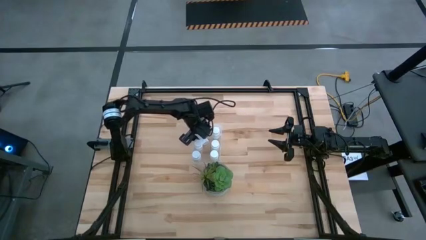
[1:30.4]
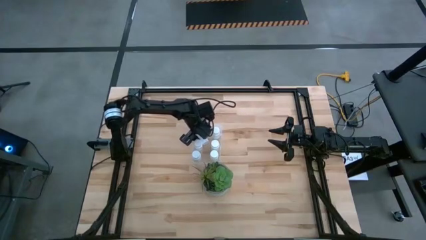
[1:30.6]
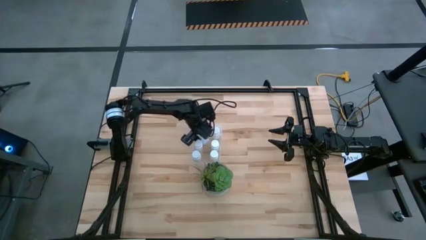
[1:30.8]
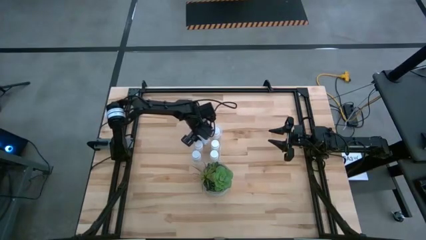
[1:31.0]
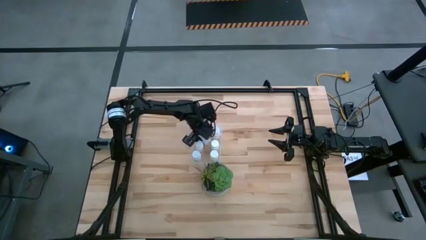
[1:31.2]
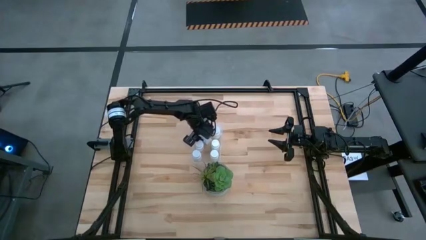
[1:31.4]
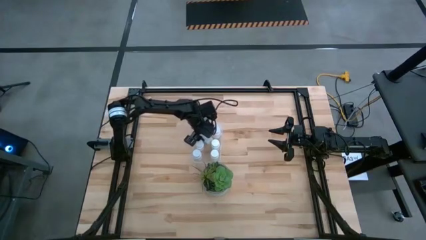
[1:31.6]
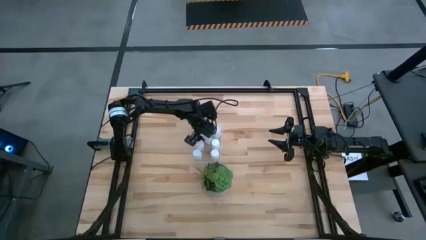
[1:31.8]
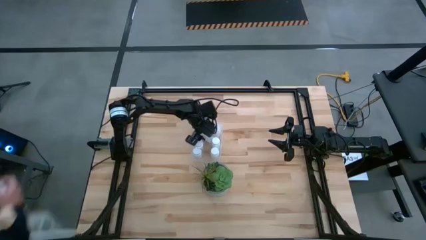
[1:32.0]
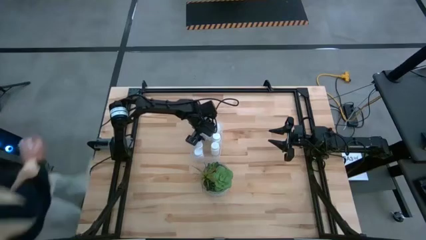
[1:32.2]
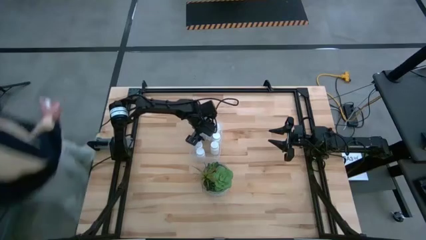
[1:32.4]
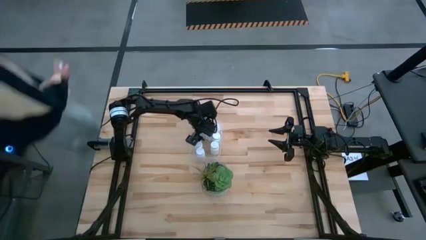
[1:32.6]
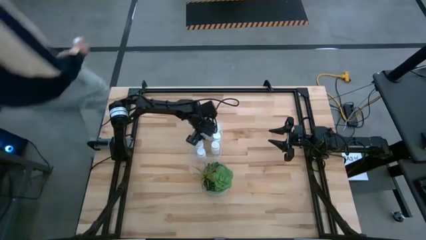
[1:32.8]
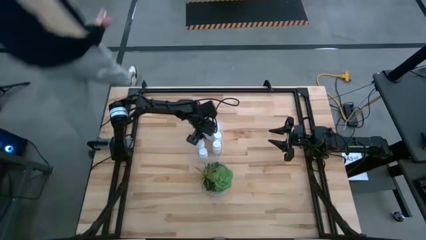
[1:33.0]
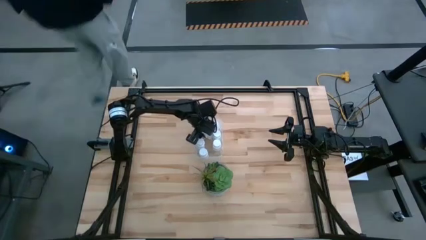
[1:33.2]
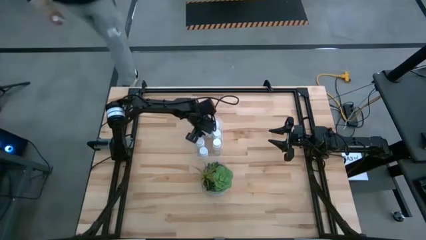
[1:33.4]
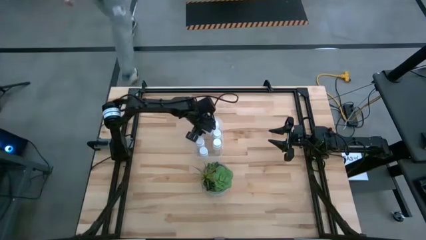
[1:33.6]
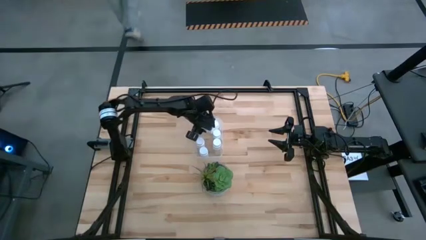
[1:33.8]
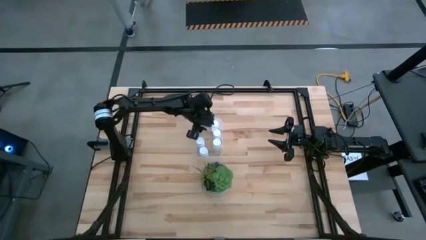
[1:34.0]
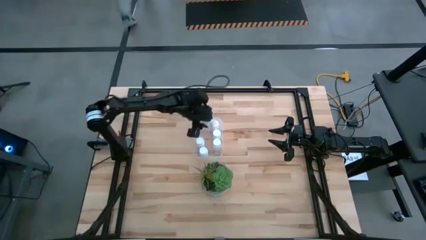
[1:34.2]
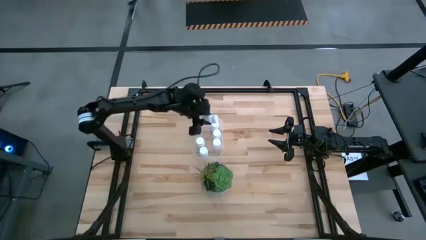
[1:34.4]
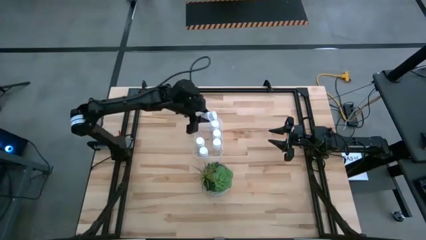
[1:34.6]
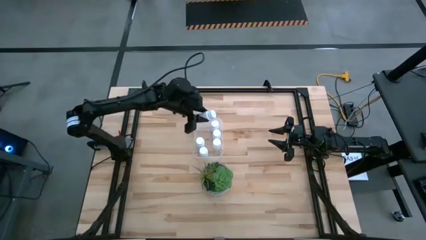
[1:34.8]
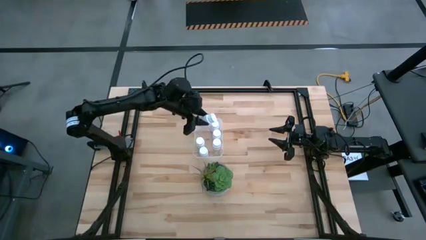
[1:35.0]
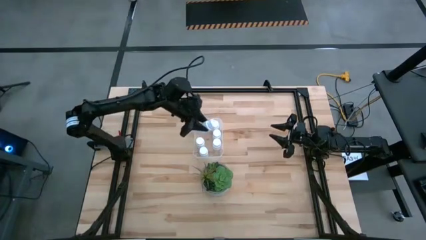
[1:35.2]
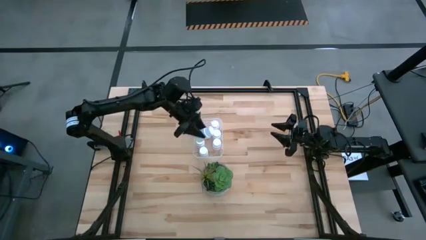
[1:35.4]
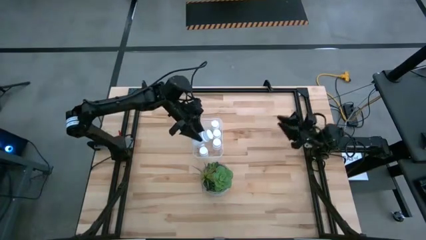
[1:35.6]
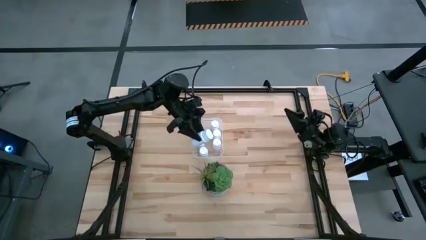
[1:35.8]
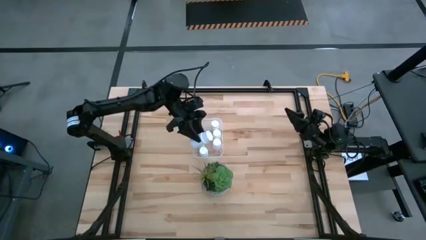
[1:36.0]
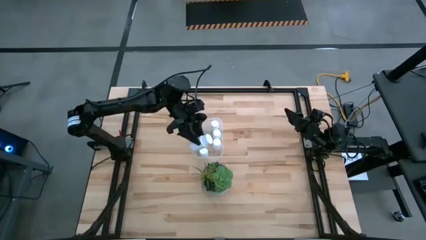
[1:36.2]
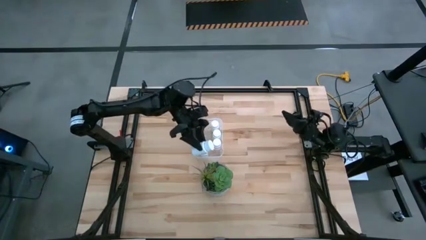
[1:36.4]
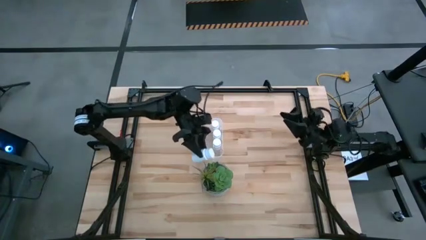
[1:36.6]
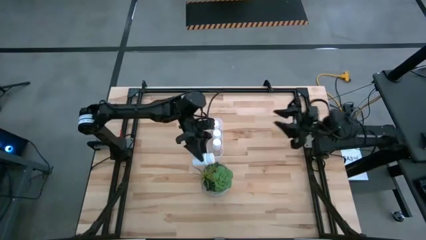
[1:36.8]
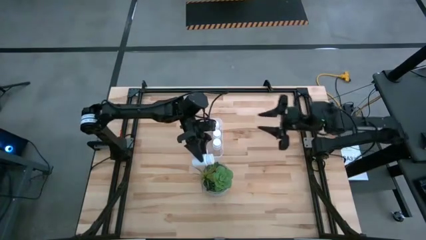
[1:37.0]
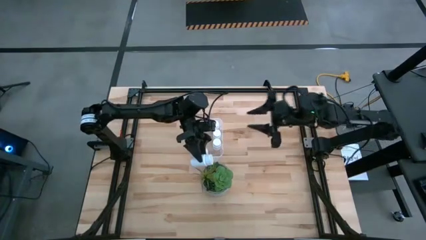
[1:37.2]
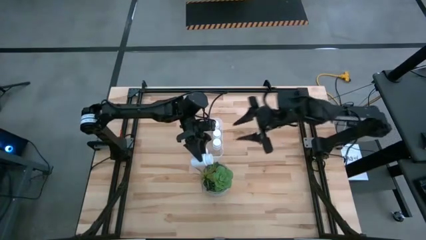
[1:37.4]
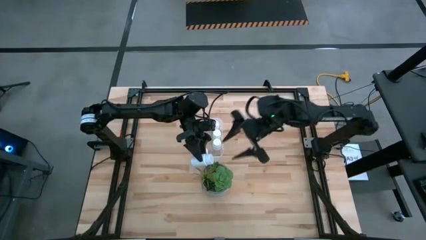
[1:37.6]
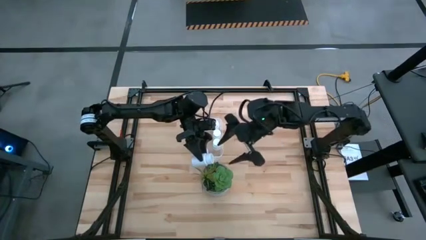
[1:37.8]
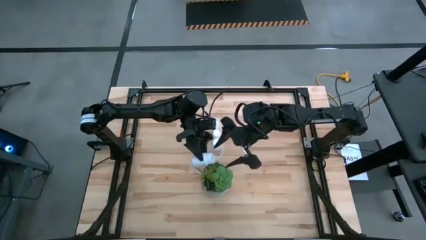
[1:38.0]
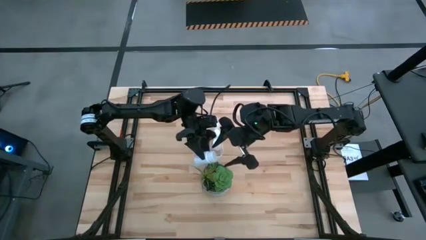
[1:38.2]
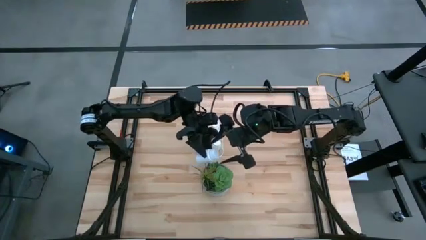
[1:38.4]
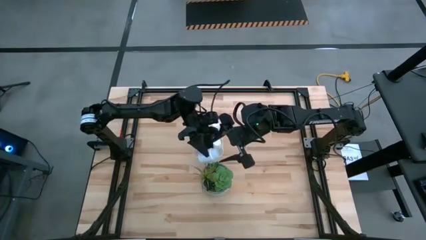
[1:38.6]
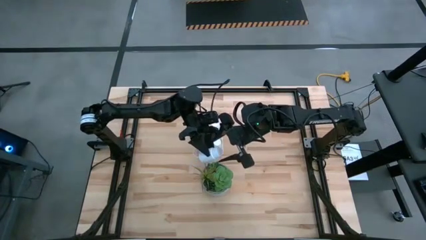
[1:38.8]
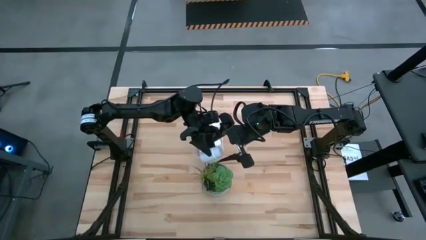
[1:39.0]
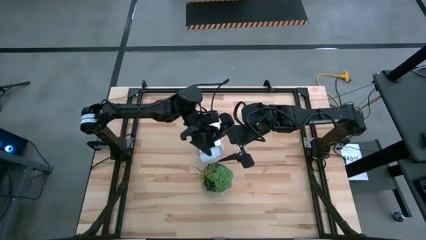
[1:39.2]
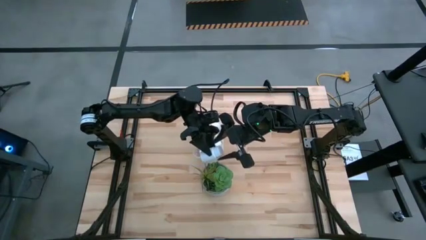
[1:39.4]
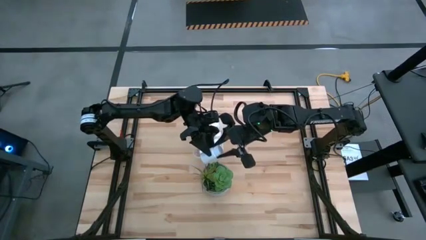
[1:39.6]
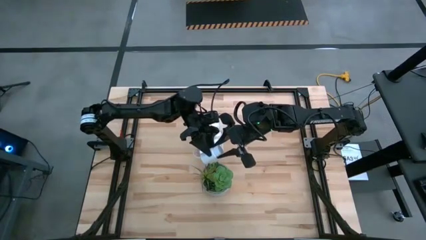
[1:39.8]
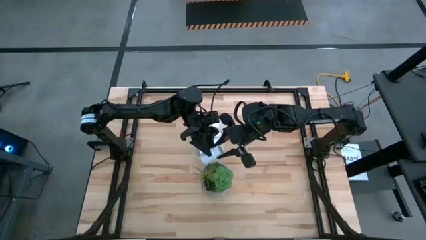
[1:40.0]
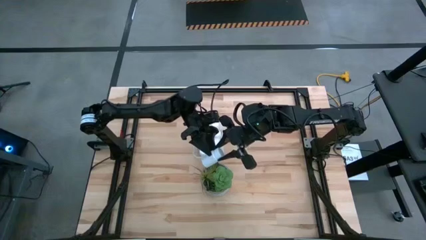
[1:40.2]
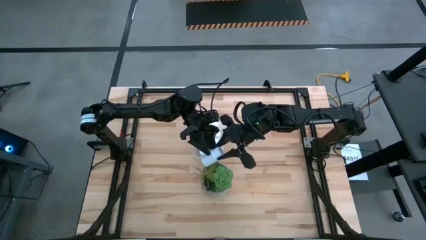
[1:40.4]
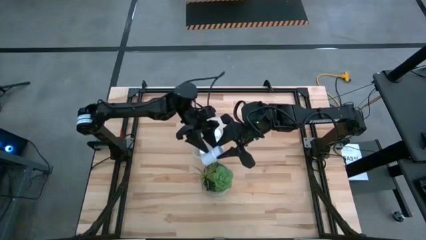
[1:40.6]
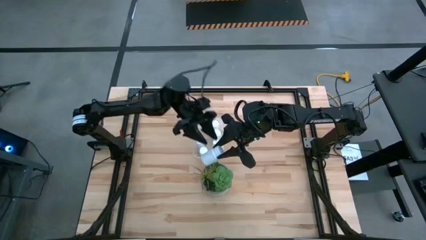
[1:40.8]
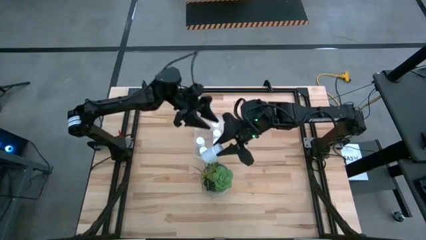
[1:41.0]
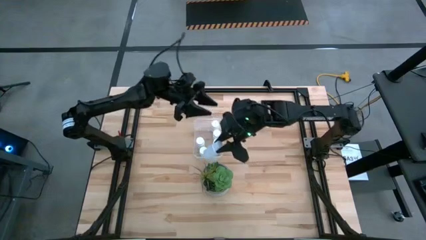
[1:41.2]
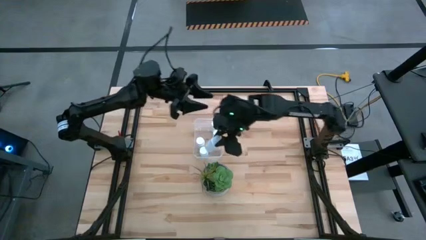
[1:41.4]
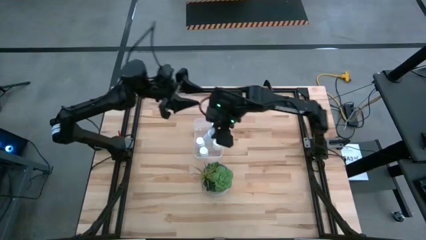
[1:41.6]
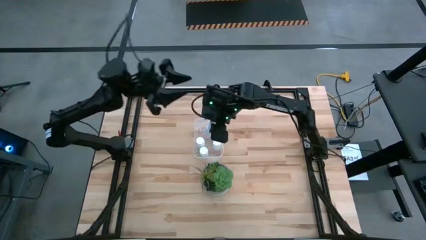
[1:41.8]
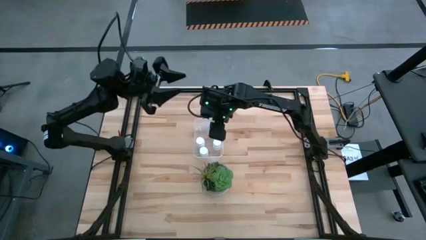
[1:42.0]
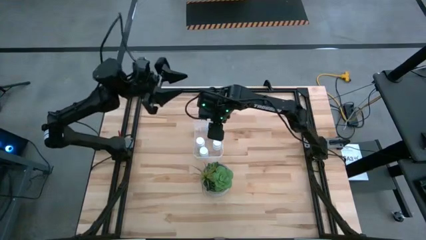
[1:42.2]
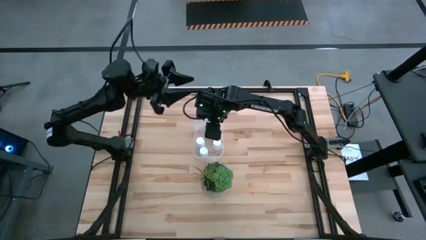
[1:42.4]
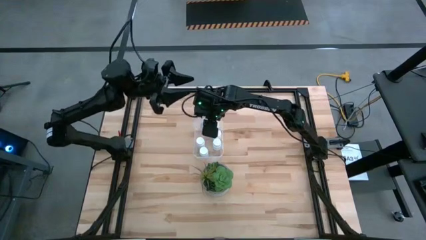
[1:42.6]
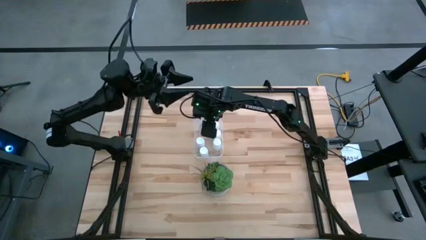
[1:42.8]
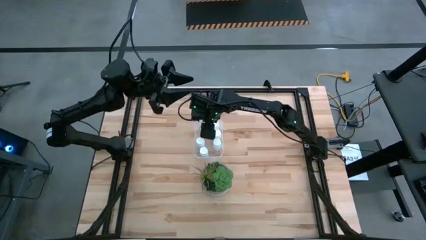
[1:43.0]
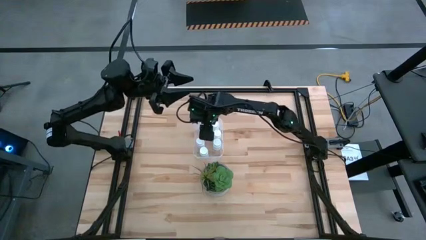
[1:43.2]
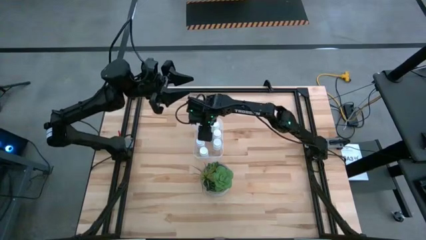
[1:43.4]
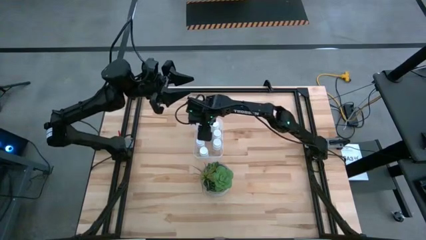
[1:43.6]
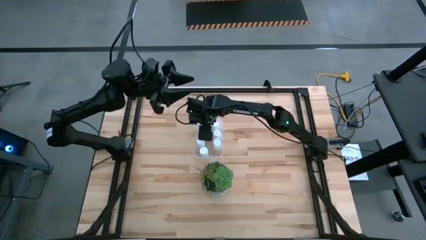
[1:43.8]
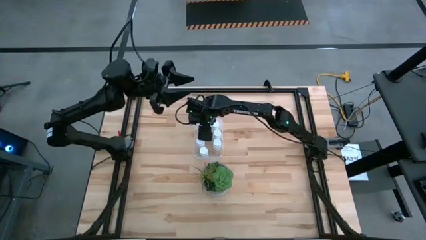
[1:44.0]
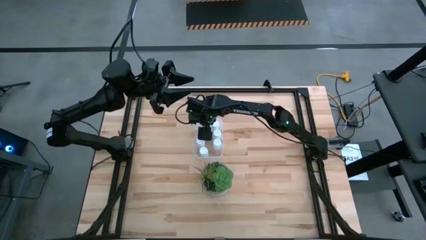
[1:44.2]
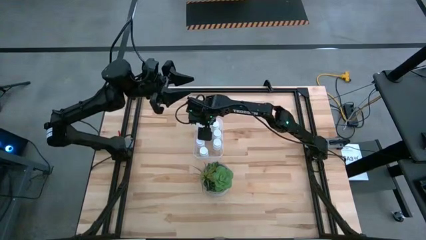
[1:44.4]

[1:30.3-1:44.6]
Task: Pick and place pill bottles into a basket
Put the white pill bottle into the transparent bin

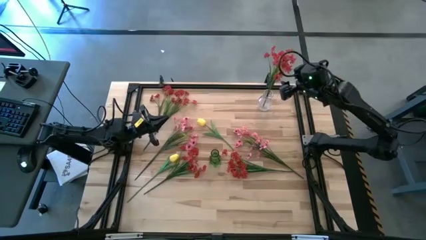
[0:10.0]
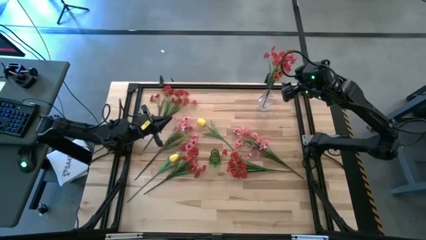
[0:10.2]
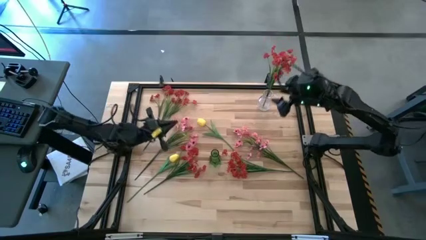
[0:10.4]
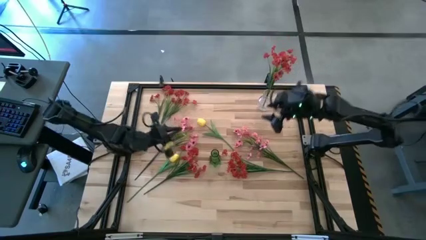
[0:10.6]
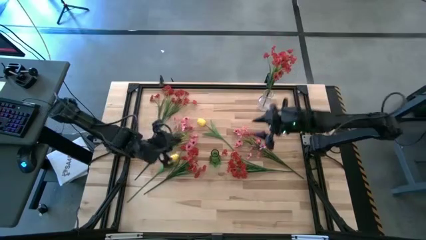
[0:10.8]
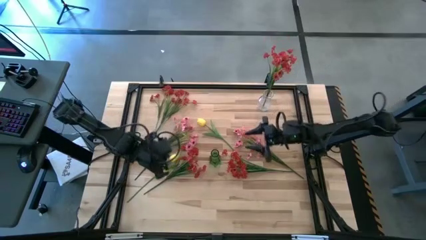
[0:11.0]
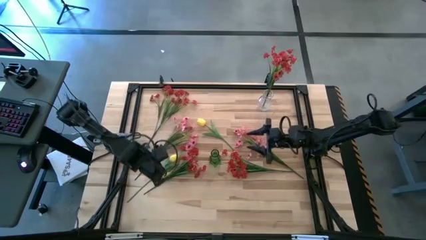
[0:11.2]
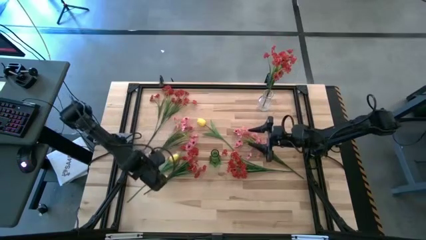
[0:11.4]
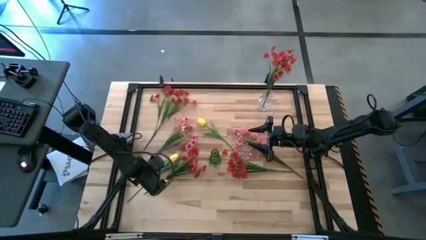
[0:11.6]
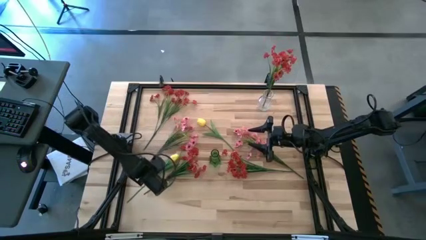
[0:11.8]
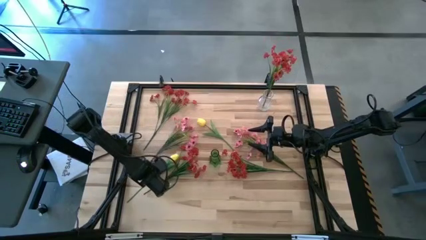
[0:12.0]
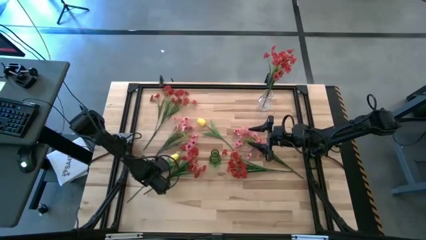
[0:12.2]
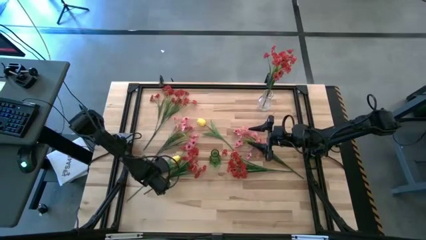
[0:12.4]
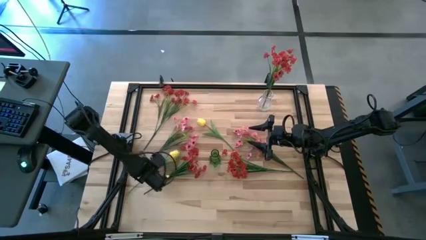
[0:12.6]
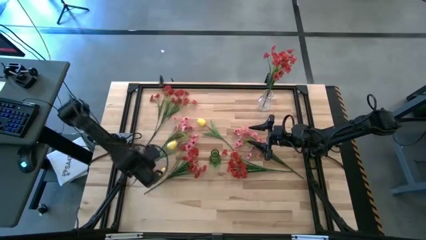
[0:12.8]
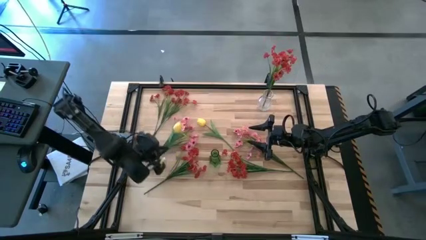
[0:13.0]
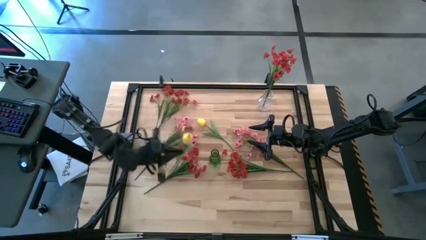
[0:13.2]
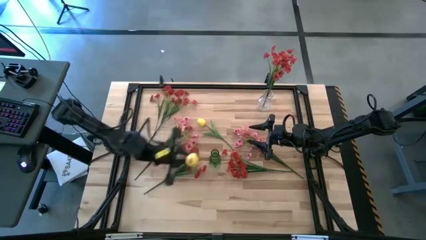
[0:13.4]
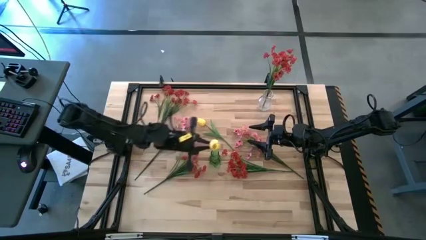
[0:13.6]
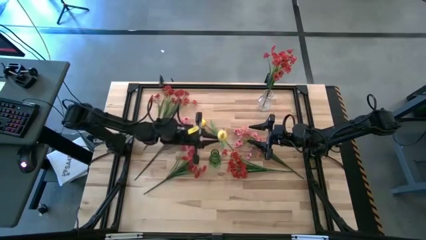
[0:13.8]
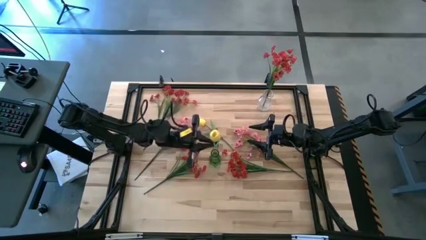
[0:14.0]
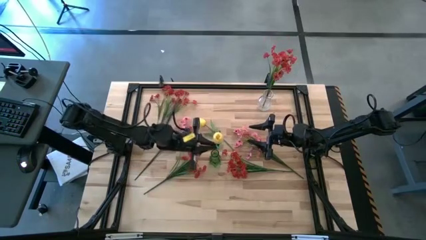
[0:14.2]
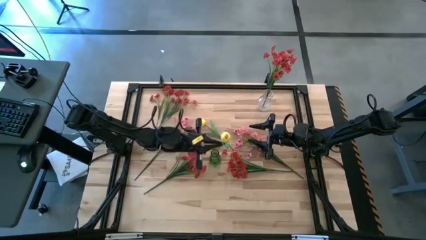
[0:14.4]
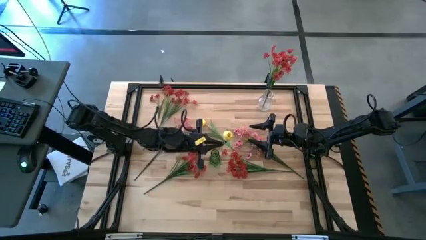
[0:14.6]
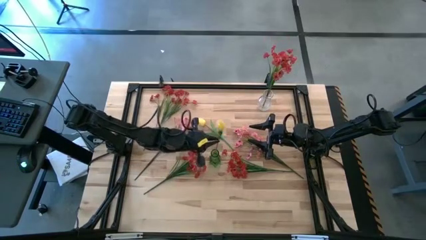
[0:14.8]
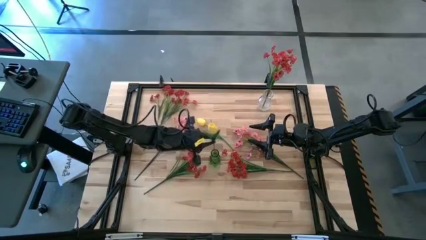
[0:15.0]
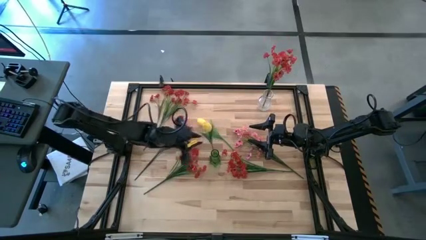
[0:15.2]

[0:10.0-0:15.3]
Task: Sort flowers into vase by color
Put the left yellow tulip into the green vase
